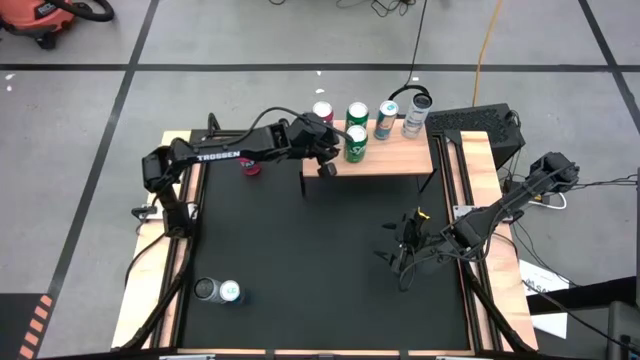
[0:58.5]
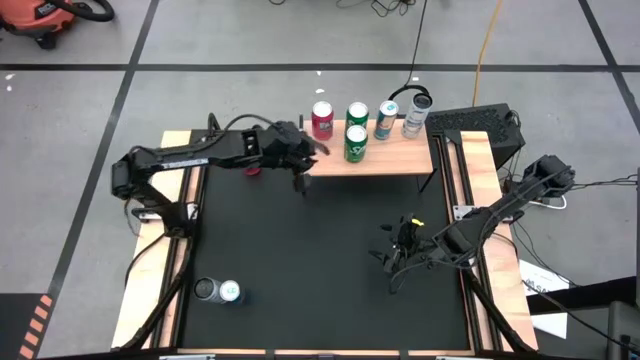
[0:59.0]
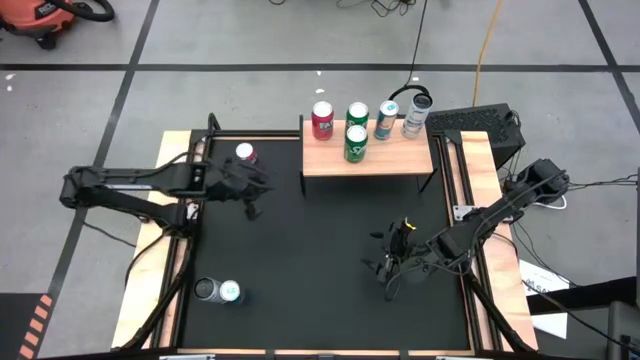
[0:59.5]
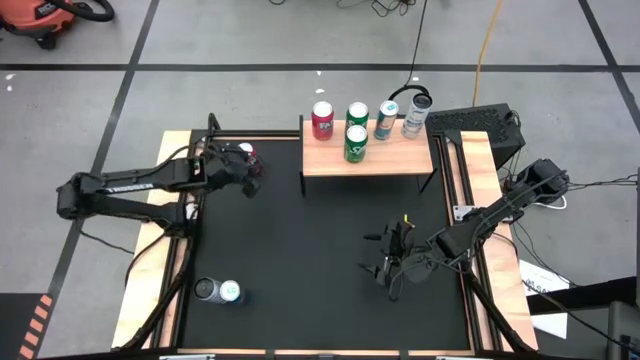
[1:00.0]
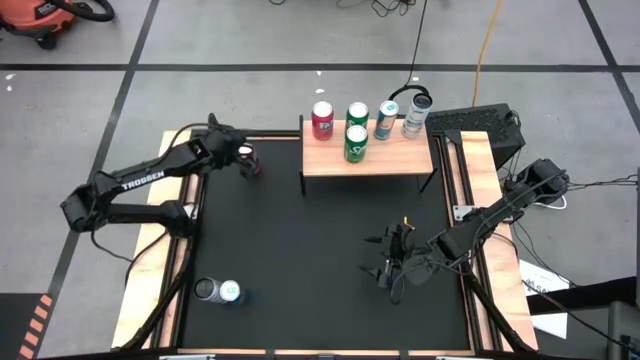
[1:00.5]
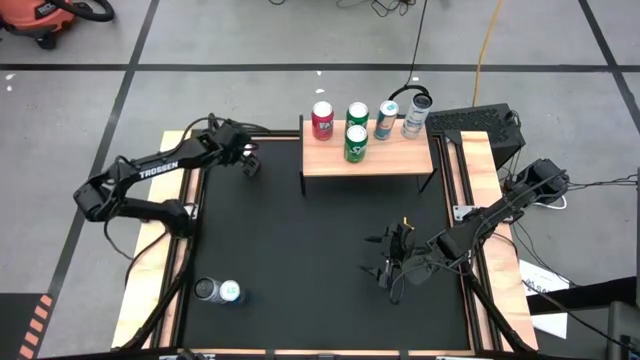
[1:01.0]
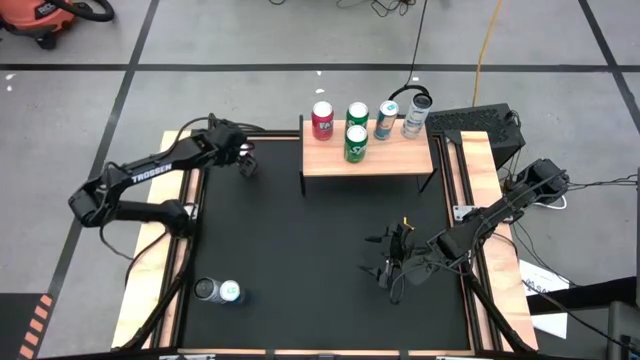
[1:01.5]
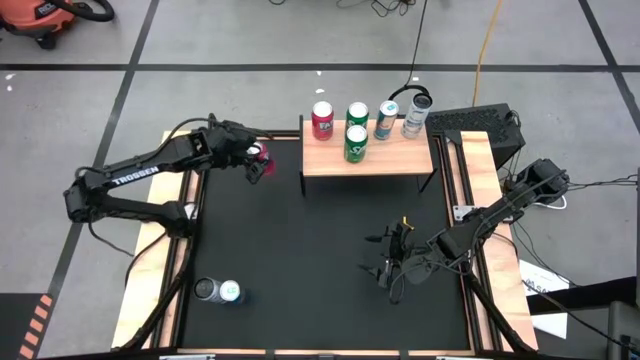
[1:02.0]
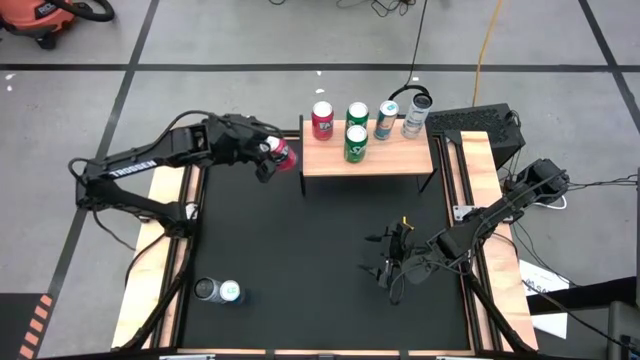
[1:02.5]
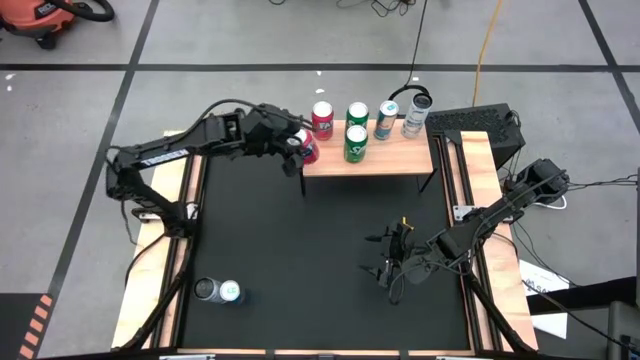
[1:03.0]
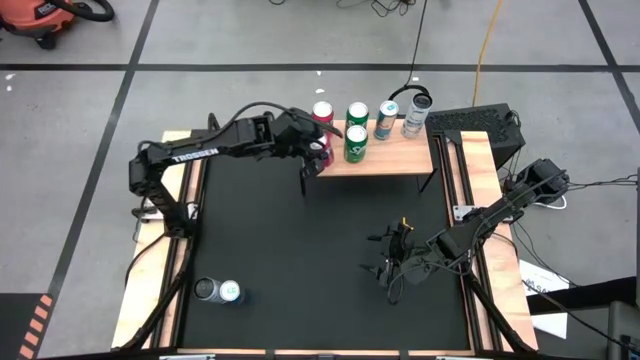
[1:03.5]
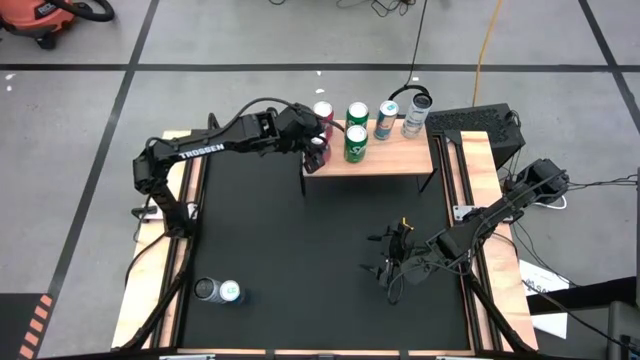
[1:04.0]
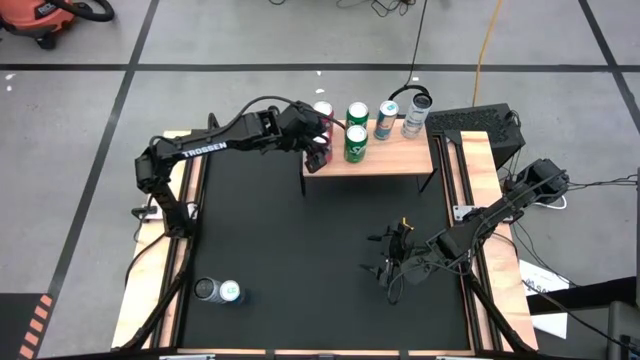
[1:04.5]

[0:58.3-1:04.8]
Task: Place canned beverage on shelf
Put the red soda can on the shelf aligned with the other red soda can

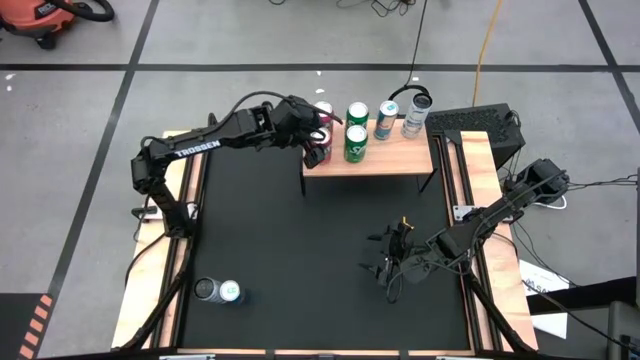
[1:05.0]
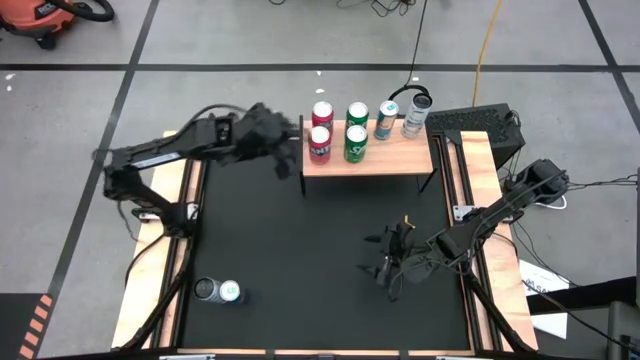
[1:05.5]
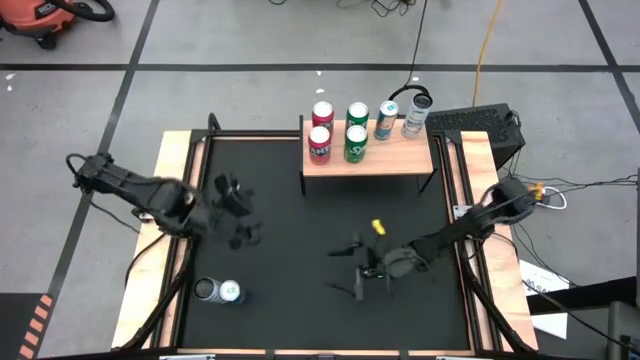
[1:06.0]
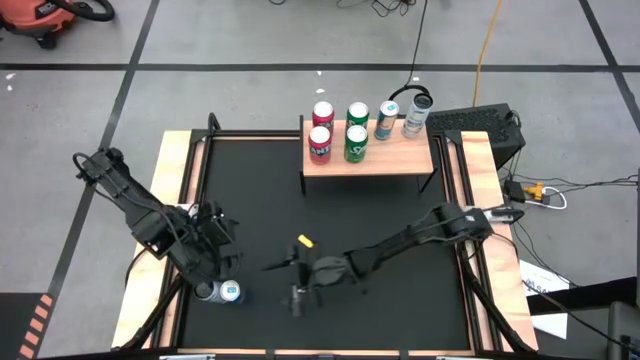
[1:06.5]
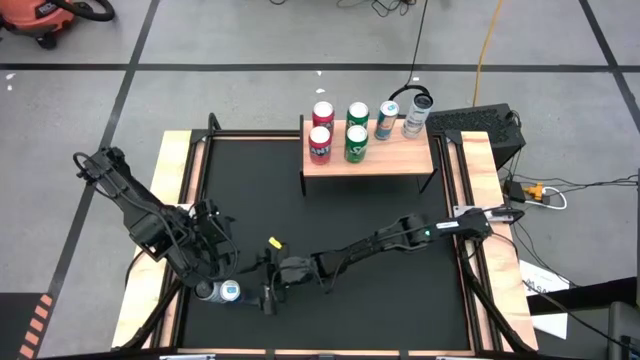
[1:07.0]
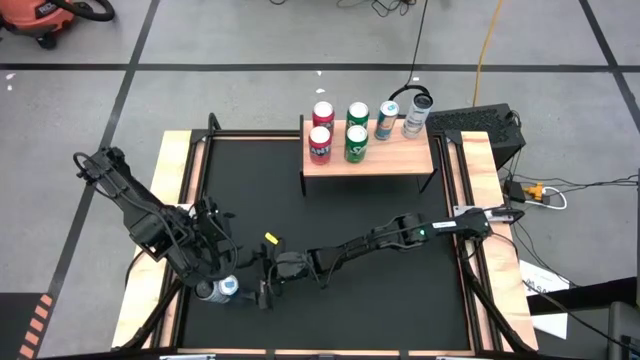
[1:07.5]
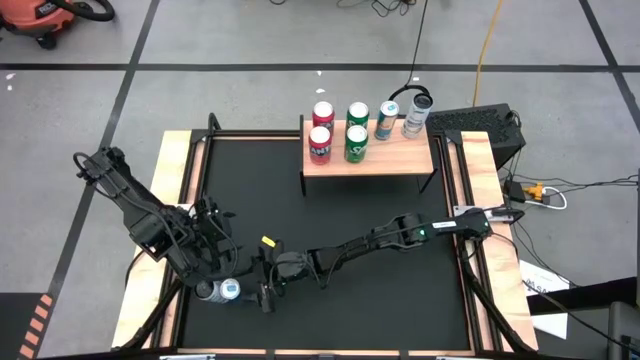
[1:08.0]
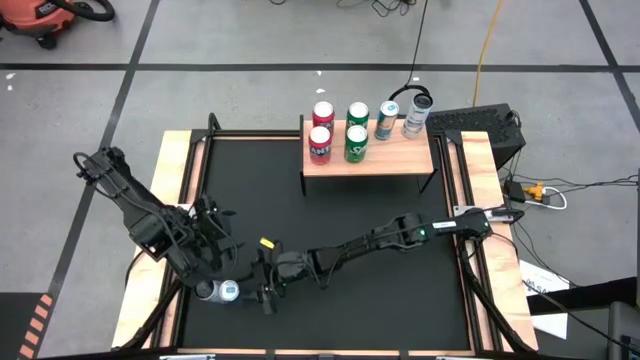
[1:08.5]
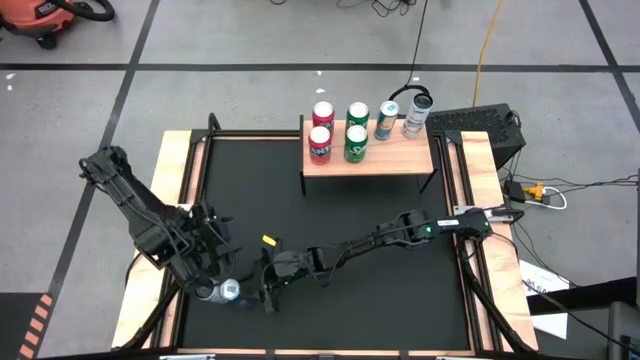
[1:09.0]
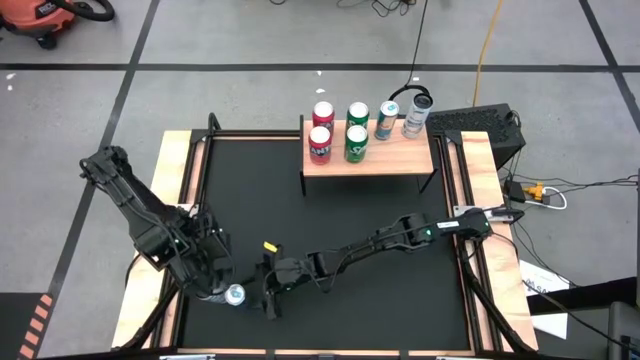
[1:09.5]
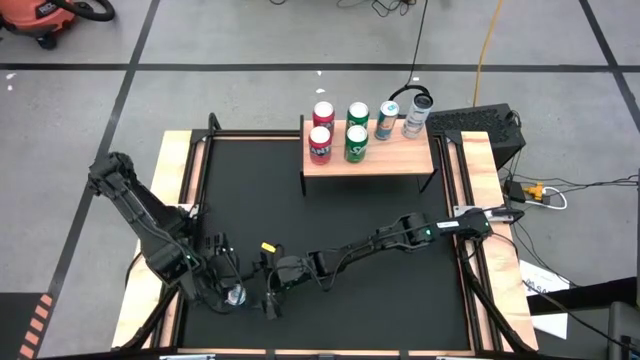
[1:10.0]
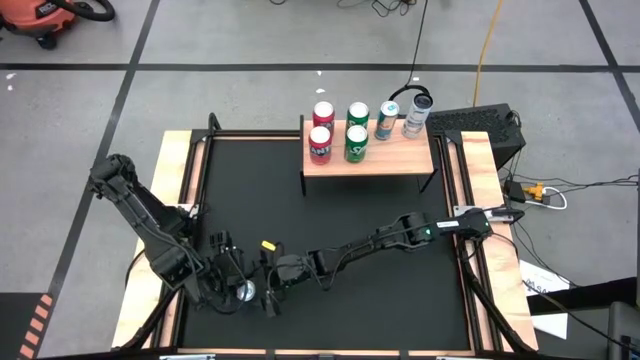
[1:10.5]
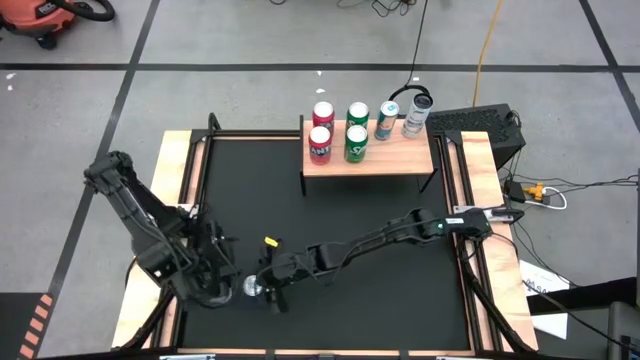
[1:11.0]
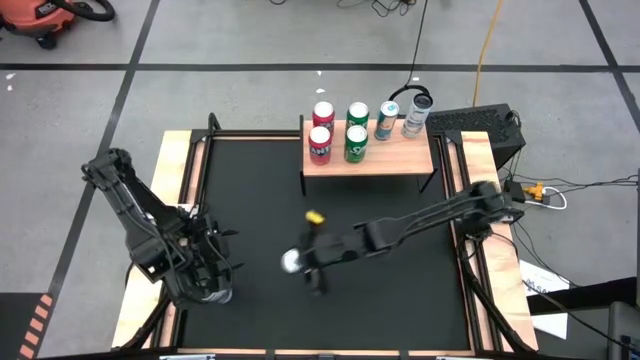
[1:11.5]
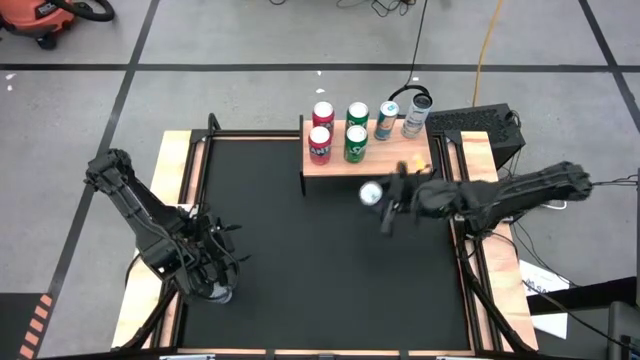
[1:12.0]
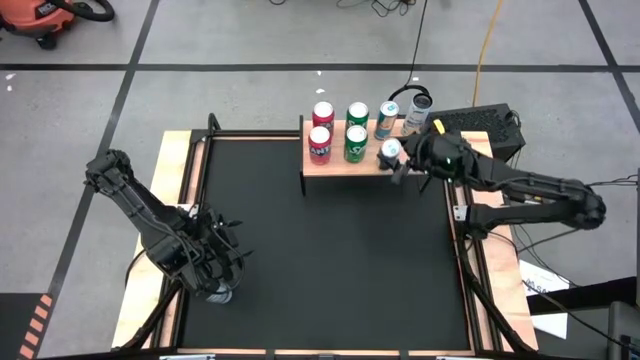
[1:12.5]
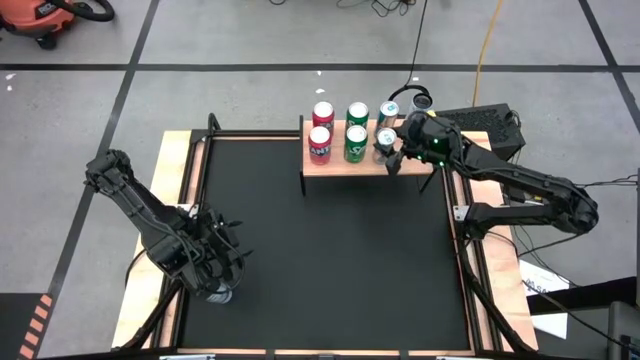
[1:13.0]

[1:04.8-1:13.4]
Put the blue soda can on the shelf aligned with the other blue soda can

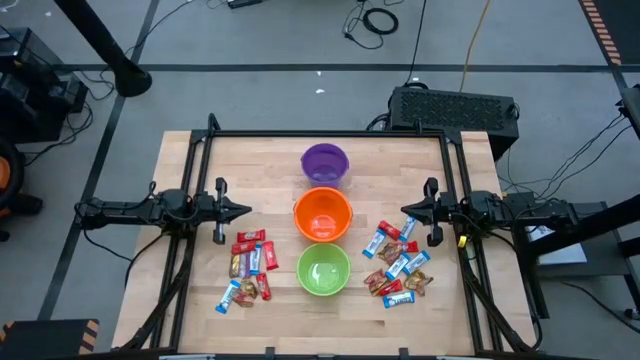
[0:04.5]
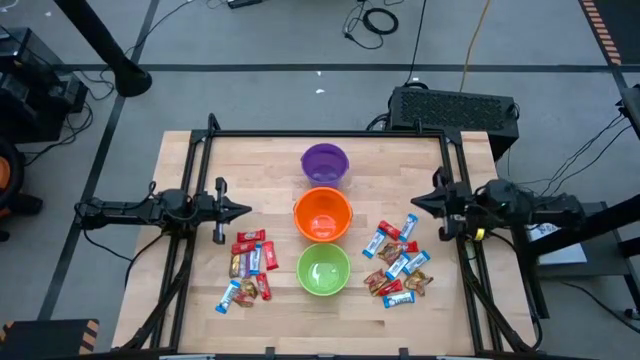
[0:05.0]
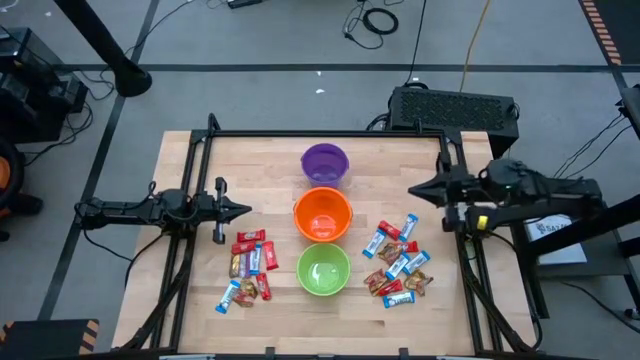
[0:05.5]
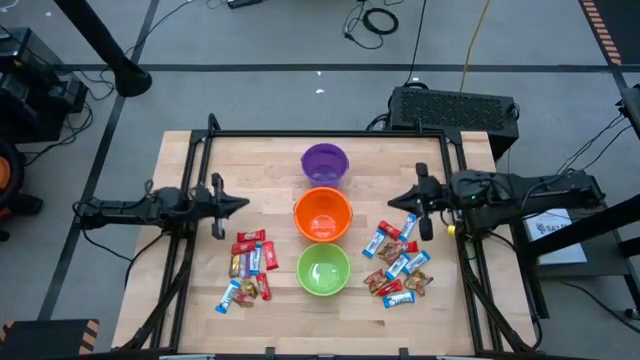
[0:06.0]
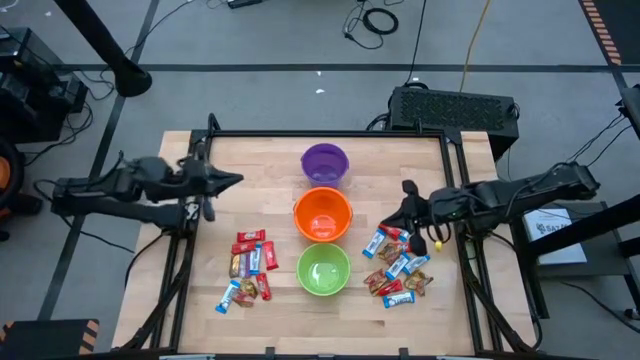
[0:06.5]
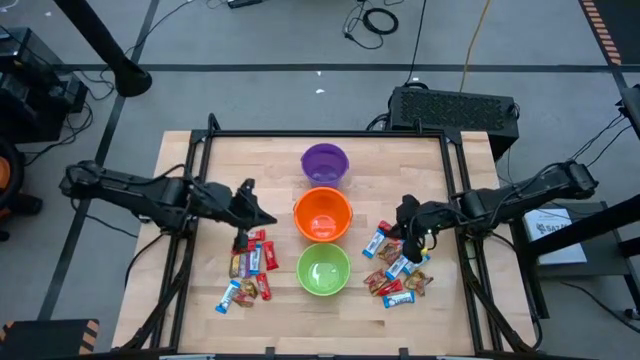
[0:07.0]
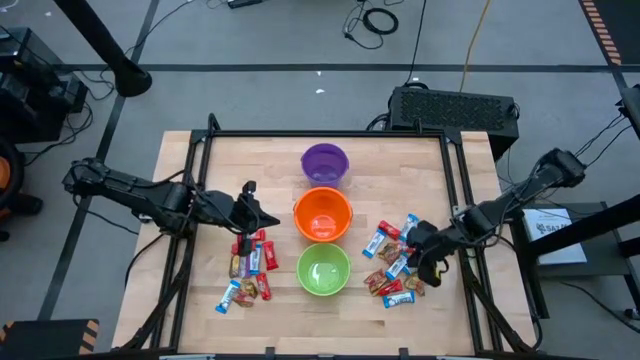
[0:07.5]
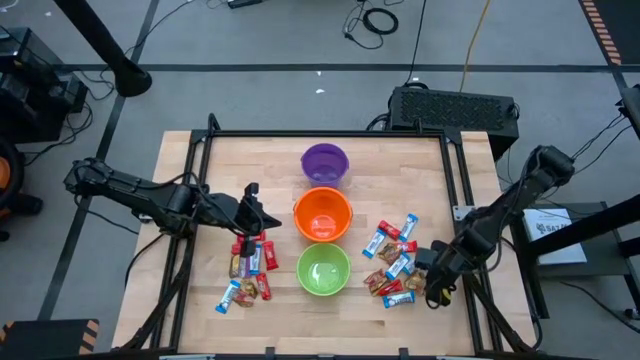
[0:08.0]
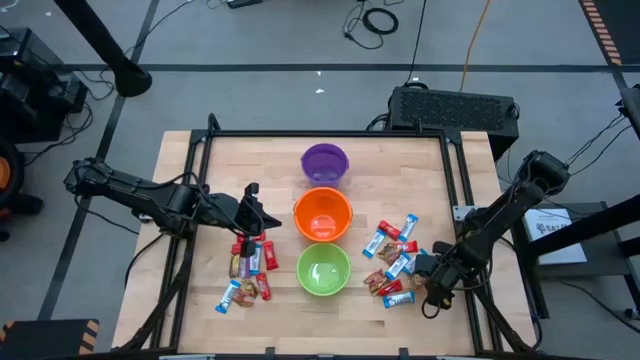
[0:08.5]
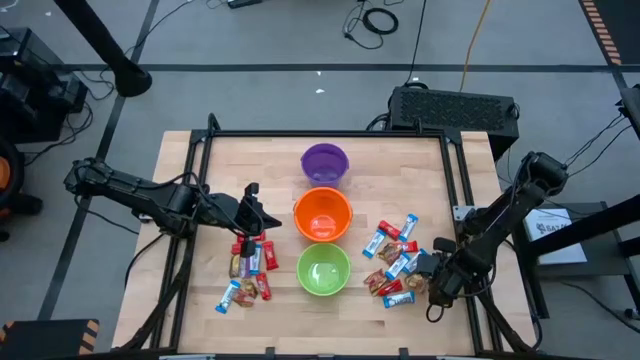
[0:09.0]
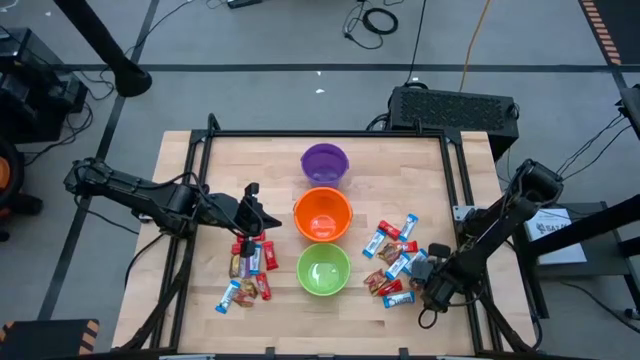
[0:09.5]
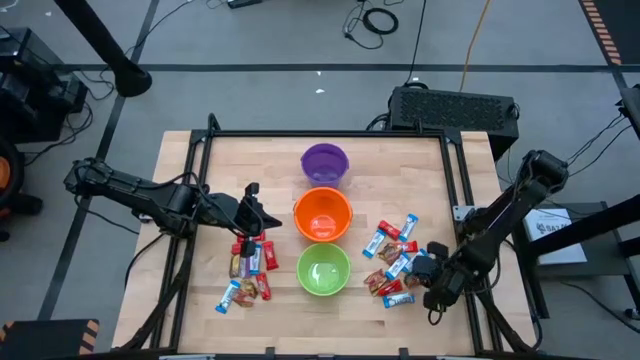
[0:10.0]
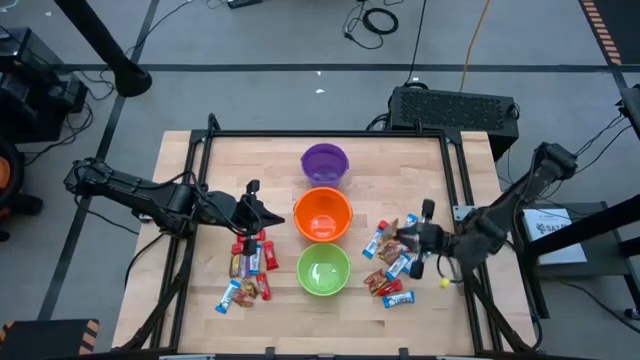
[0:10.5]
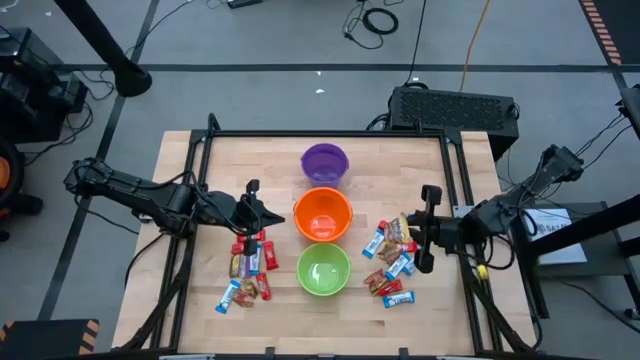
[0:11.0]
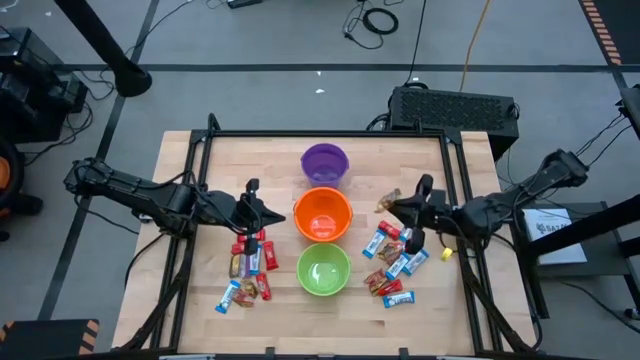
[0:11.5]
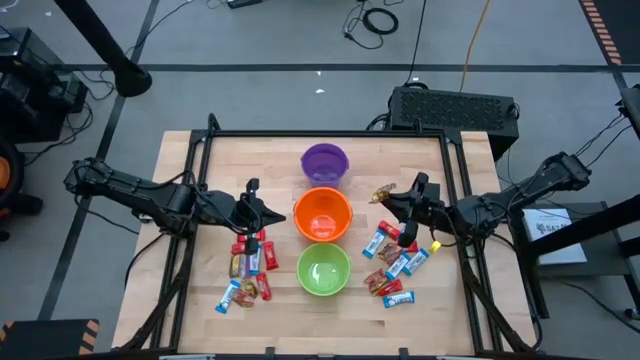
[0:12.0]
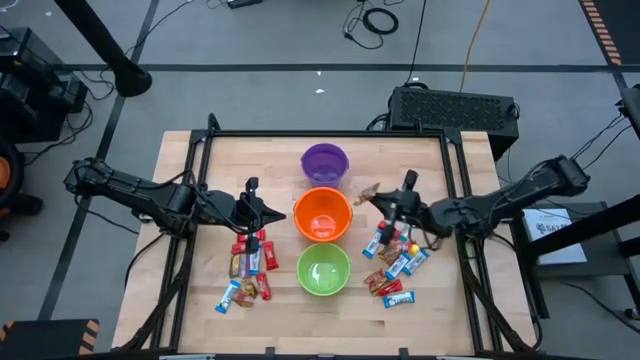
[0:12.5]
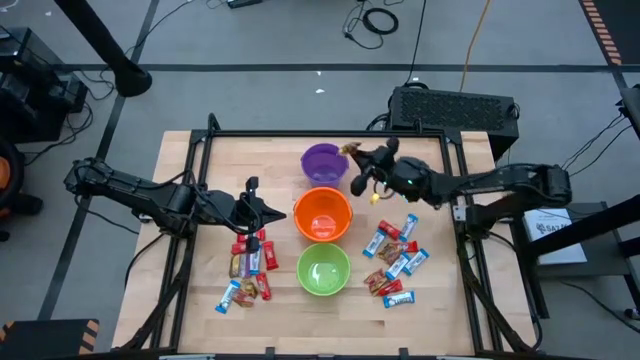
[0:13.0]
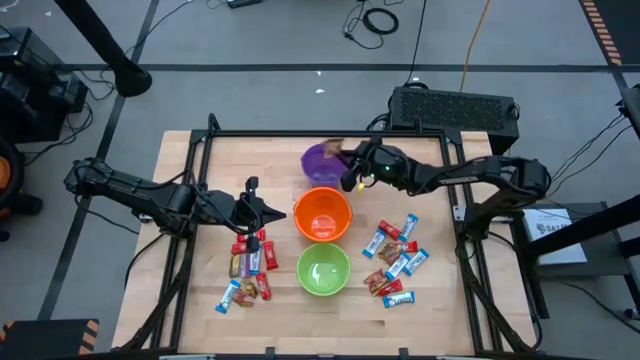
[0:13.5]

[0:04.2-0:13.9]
Task: Sort candy by brand, put in halloween buckets
Put golden candy into the purple bucket
